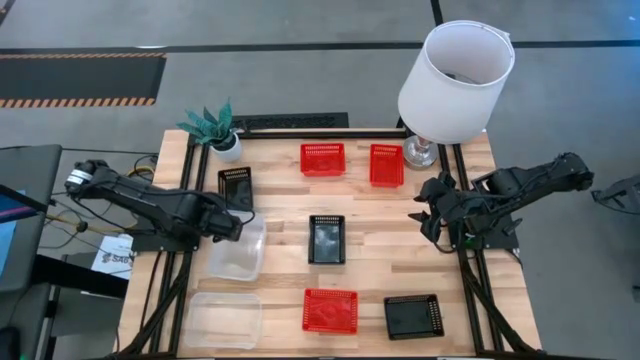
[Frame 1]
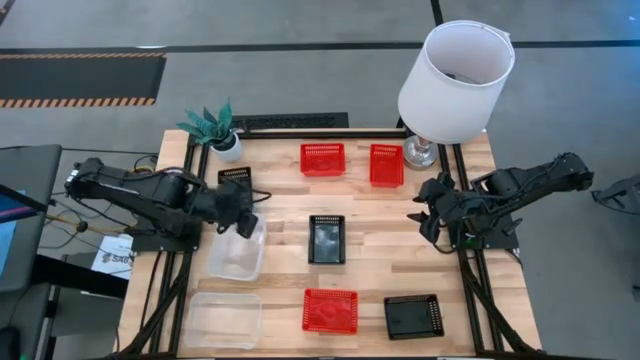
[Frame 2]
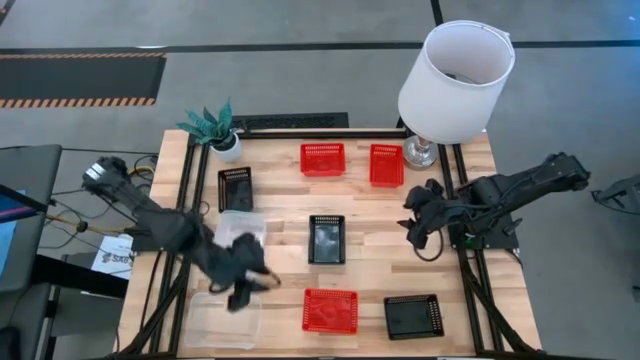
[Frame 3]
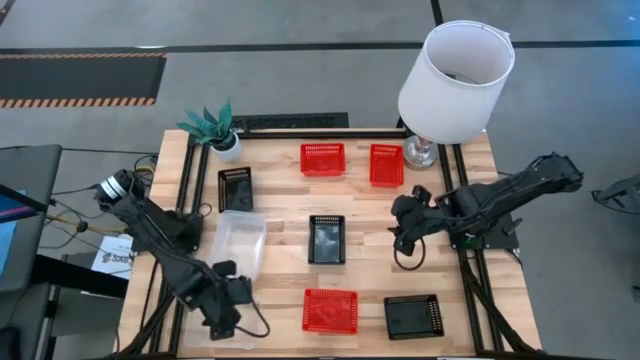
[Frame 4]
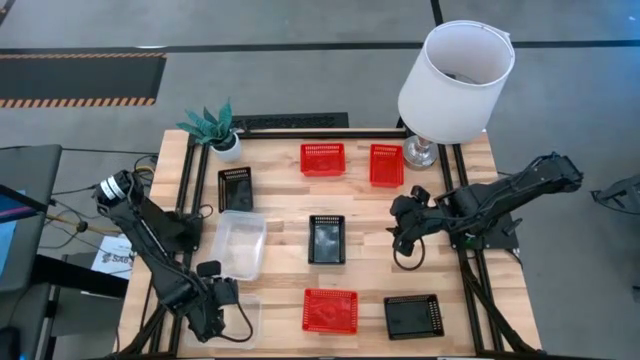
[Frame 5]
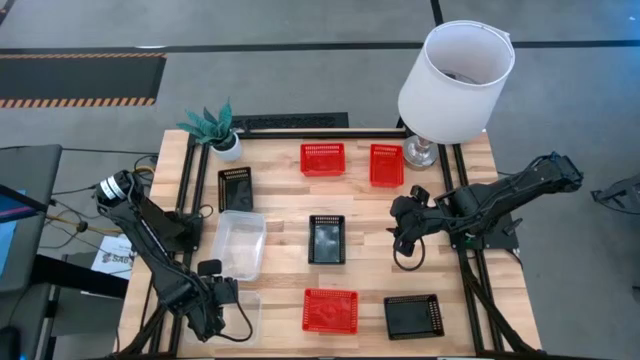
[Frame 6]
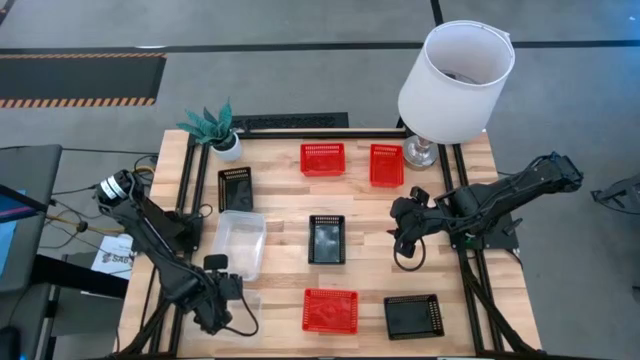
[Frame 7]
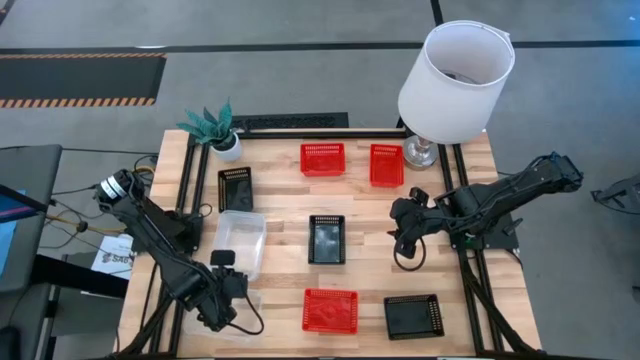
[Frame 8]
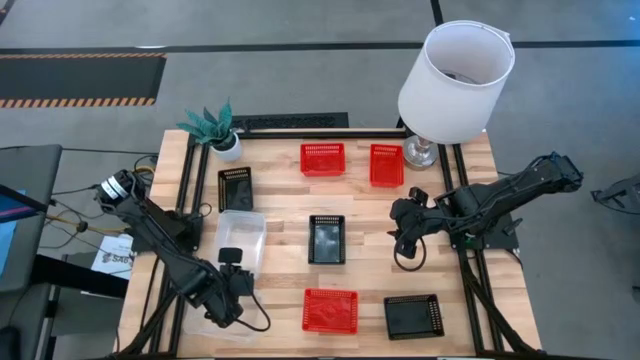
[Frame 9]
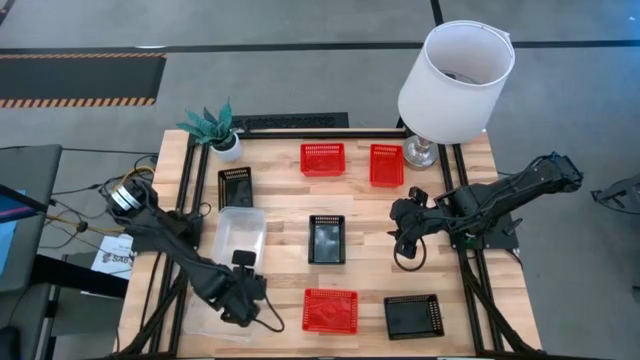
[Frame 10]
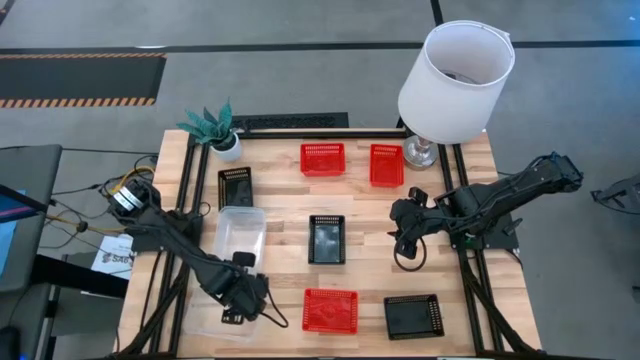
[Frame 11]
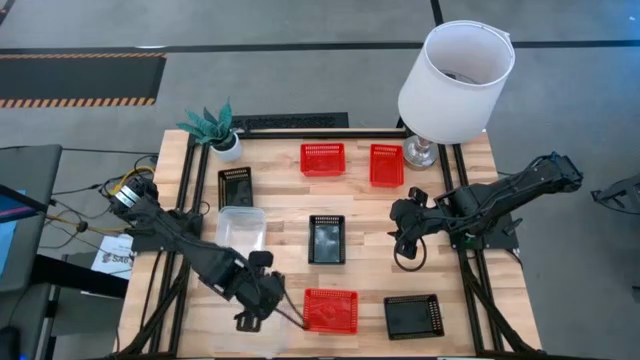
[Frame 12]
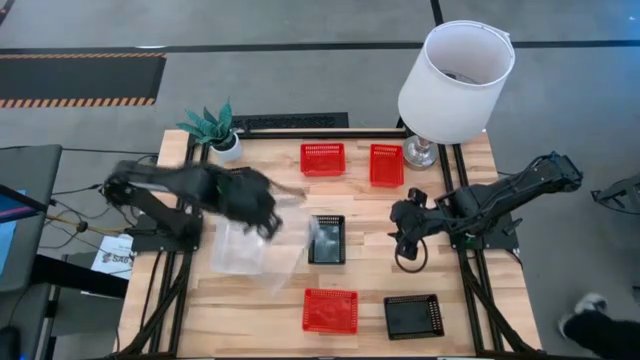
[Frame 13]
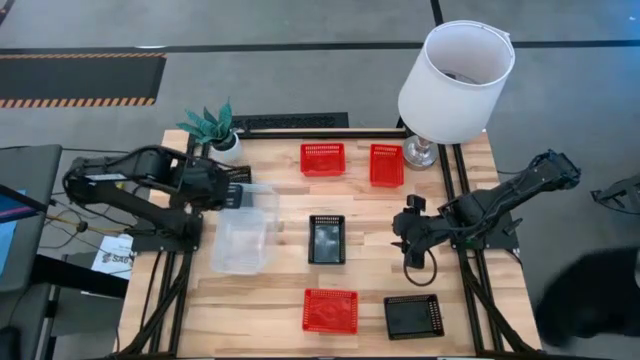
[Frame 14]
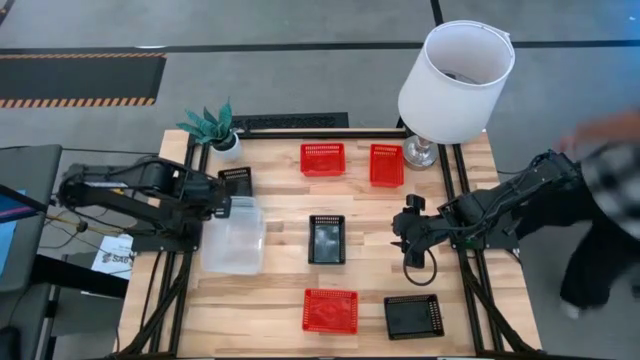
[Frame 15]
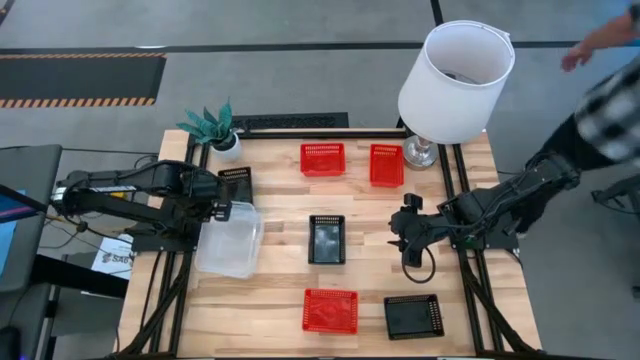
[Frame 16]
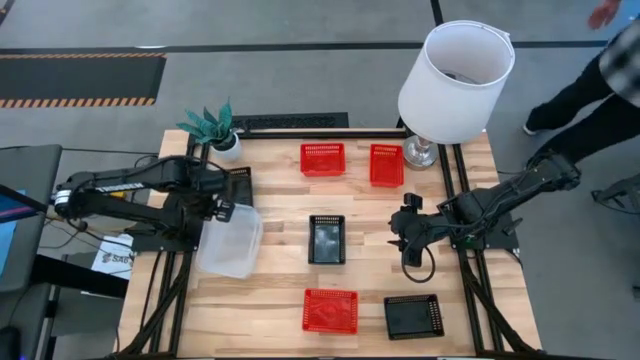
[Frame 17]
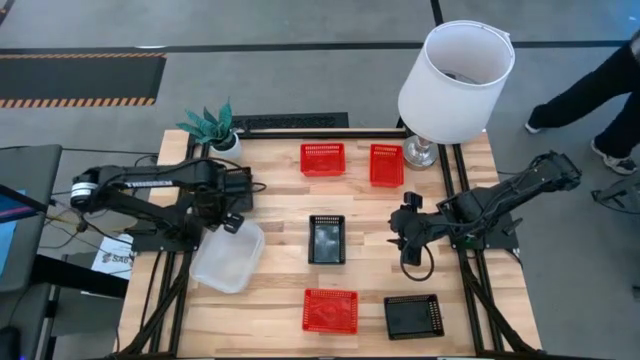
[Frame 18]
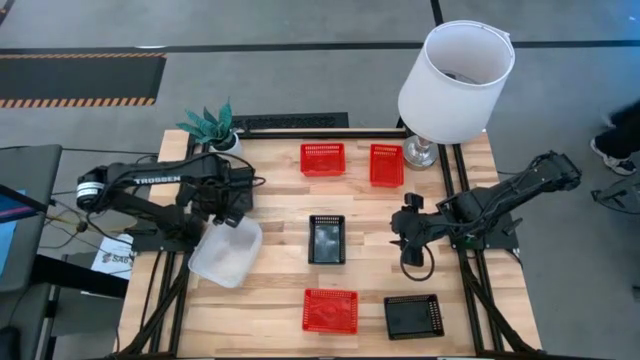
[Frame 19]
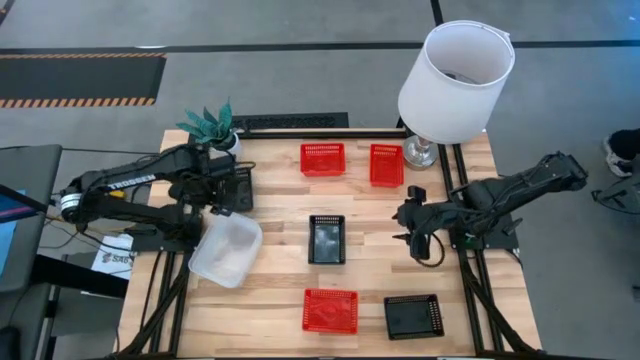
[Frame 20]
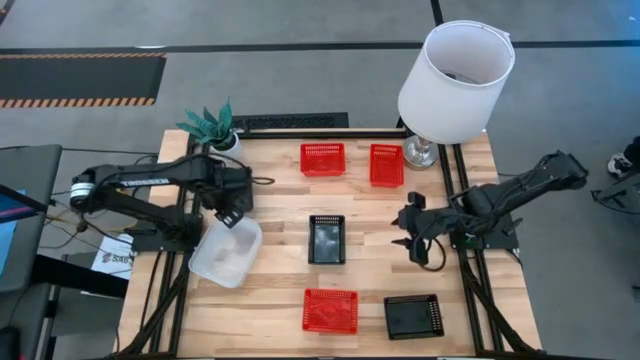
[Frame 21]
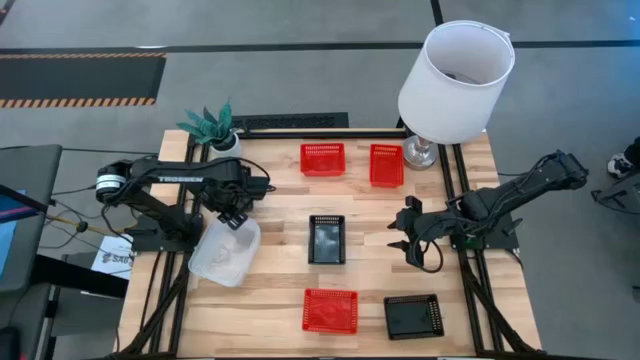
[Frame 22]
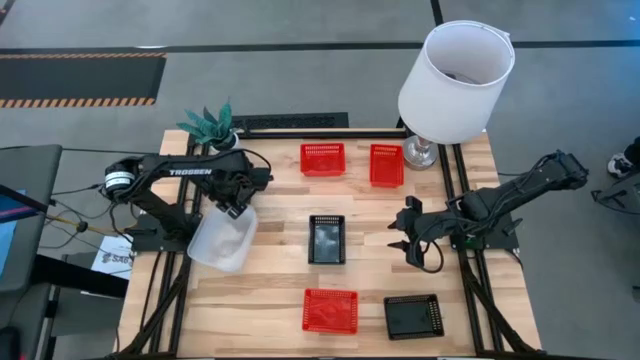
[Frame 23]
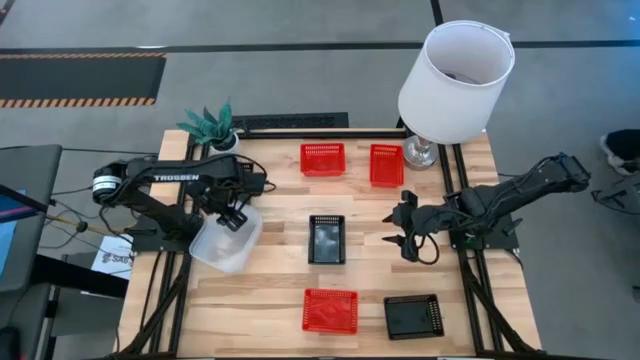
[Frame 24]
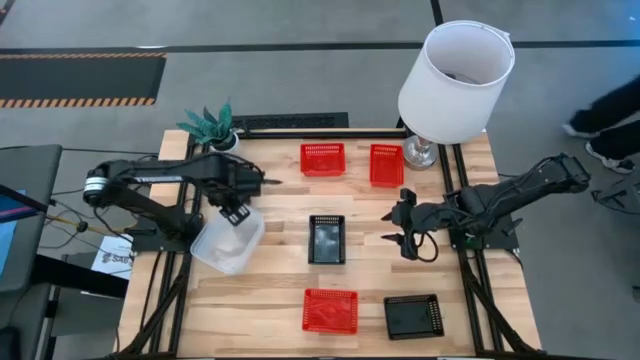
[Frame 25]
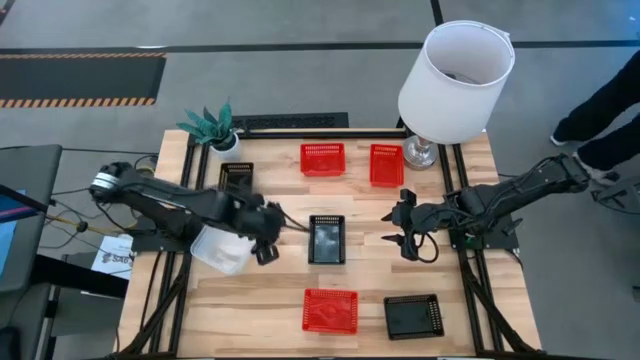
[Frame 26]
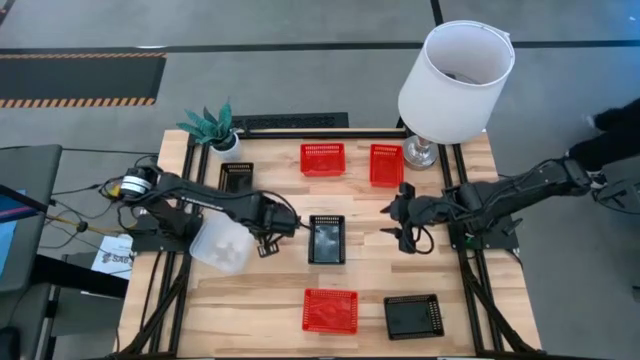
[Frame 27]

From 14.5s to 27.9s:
Stack the bottom transparent bin on the top transparent bin

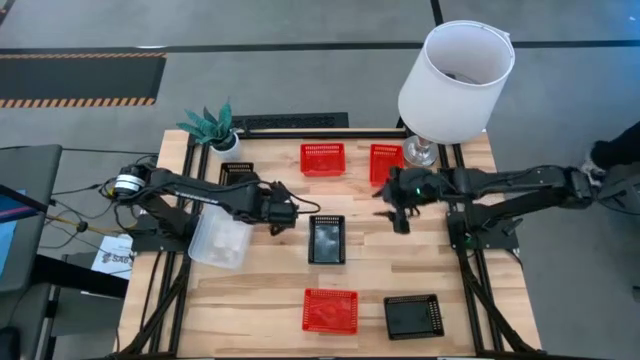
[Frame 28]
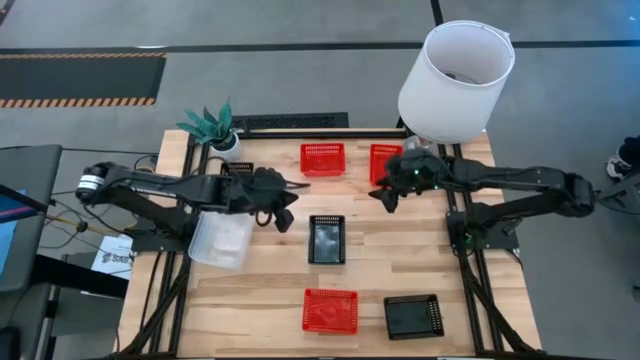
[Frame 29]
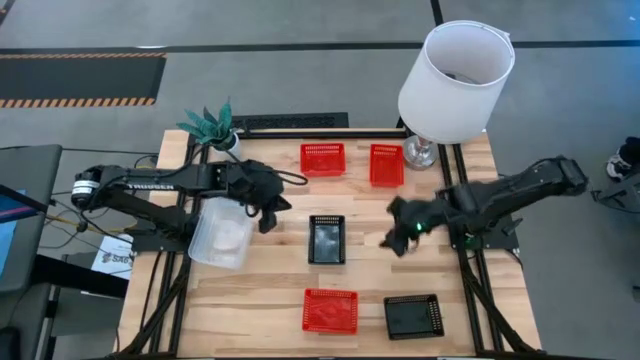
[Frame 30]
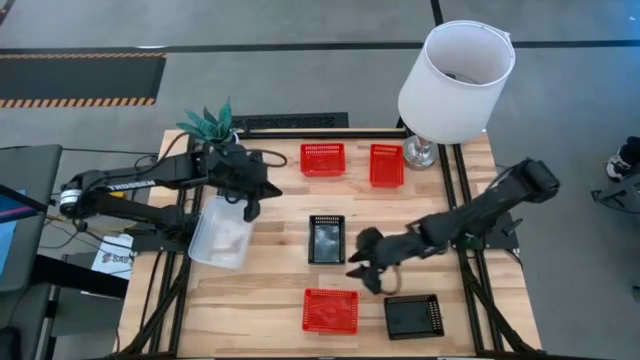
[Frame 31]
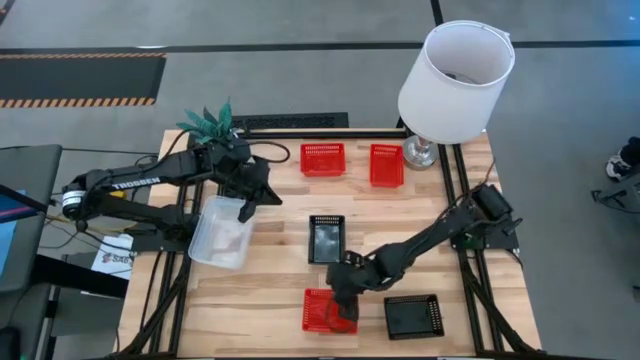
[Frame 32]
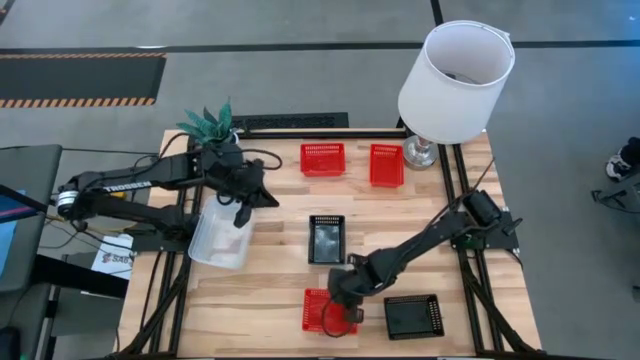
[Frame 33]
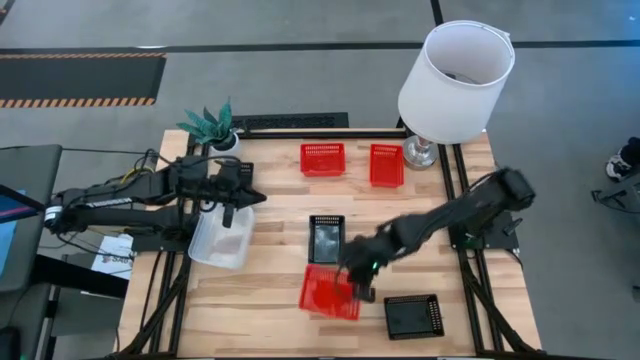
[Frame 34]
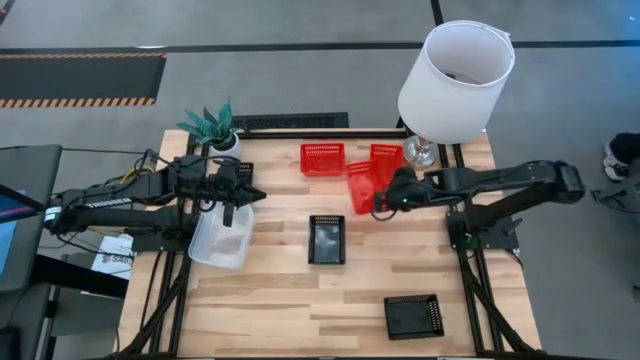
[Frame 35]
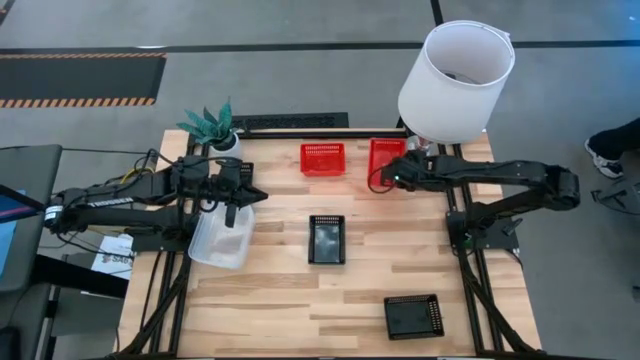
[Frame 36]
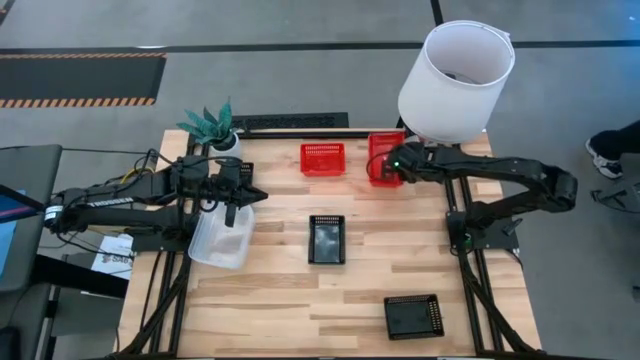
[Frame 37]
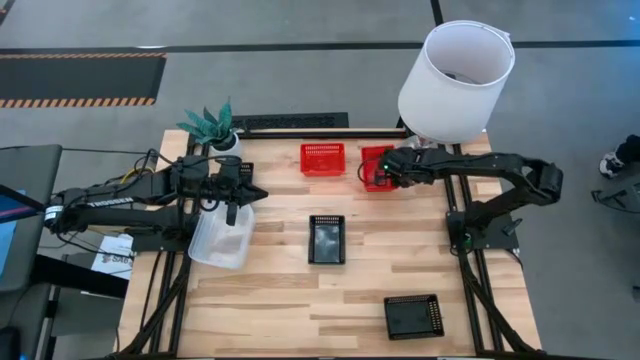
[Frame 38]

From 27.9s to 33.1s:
Stack the bottom red bin on the top right red bin

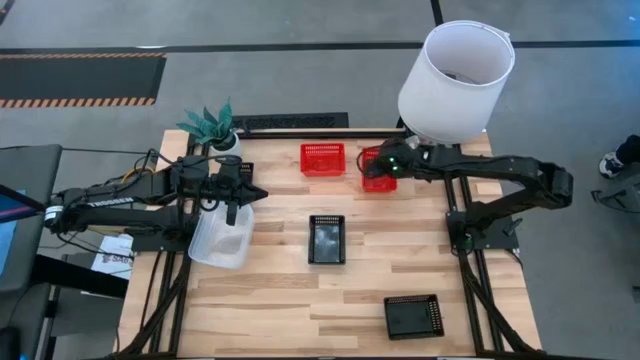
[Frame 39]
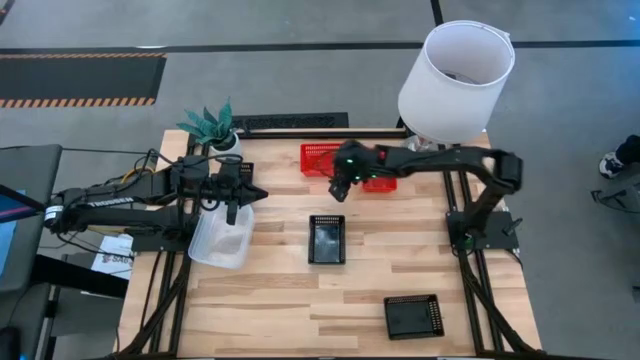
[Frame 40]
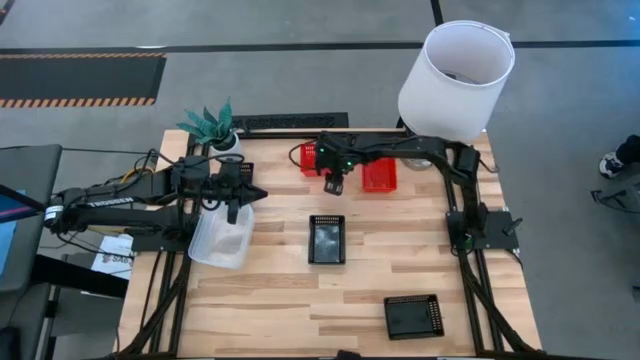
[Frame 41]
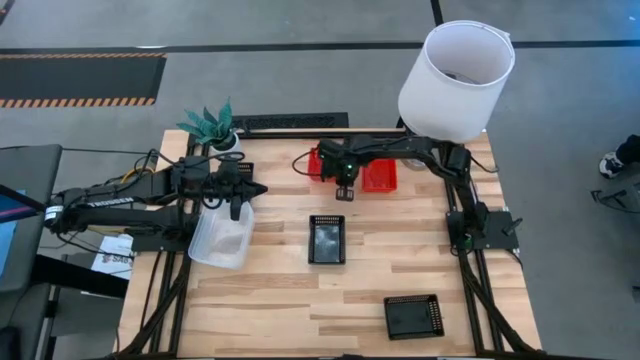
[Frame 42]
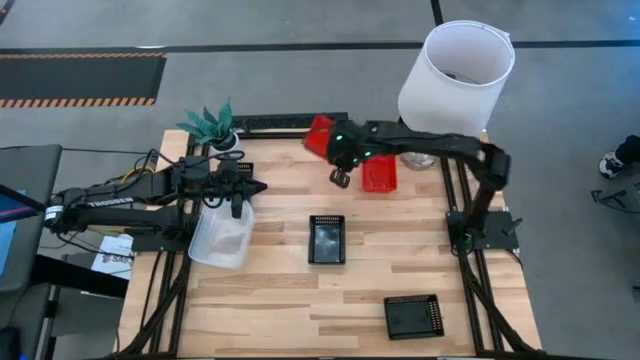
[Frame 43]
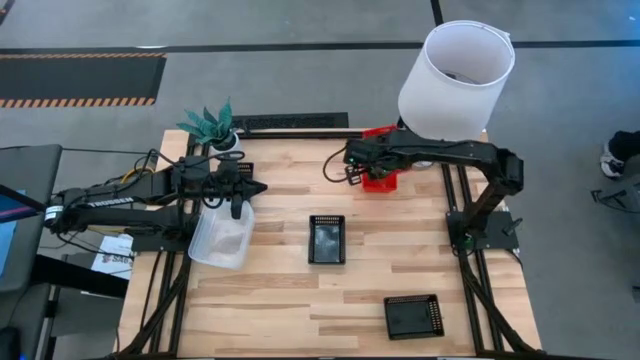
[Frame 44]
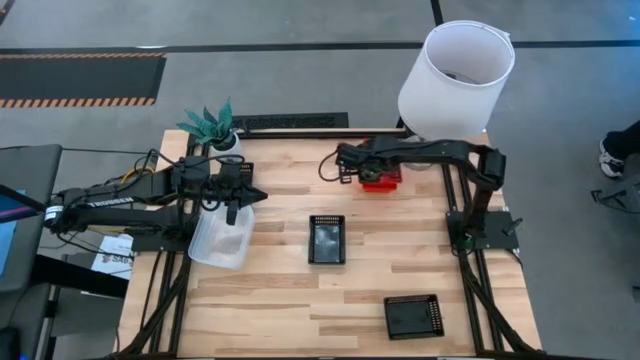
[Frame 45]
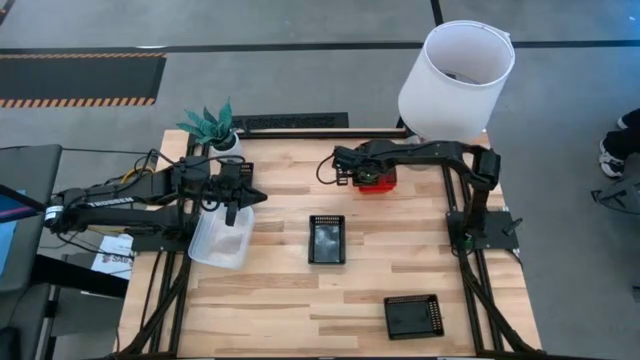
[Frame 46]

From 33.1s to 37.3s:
Stack the left red bin on the right red bin
